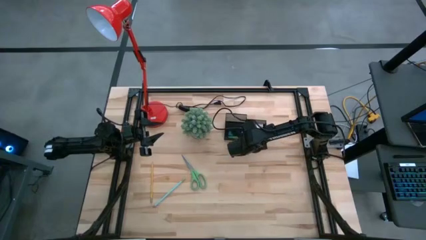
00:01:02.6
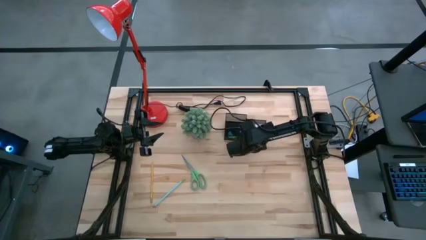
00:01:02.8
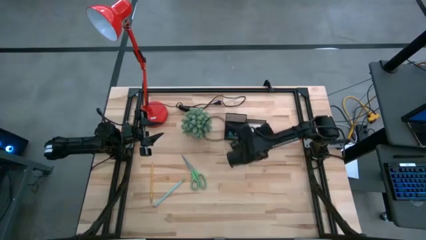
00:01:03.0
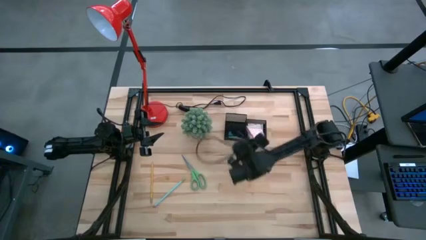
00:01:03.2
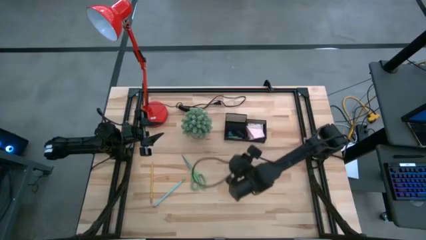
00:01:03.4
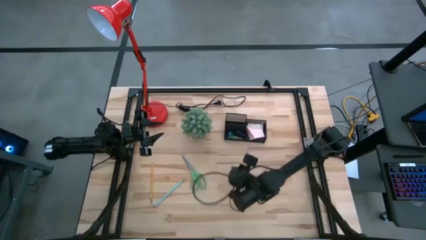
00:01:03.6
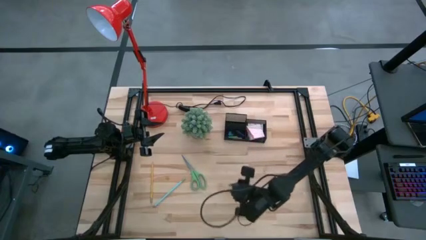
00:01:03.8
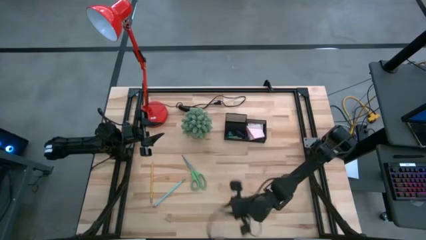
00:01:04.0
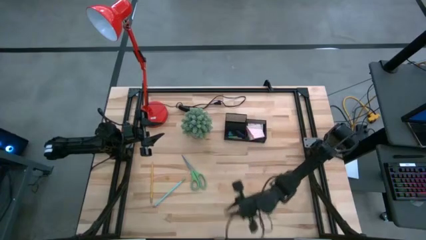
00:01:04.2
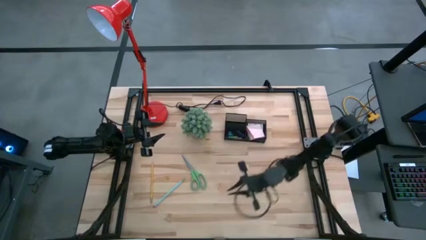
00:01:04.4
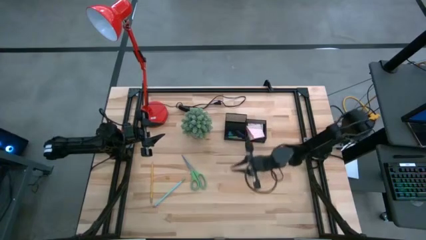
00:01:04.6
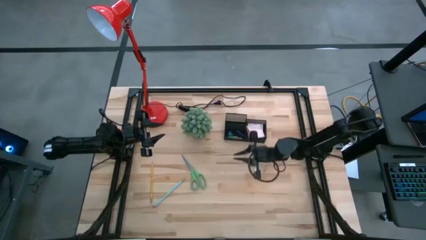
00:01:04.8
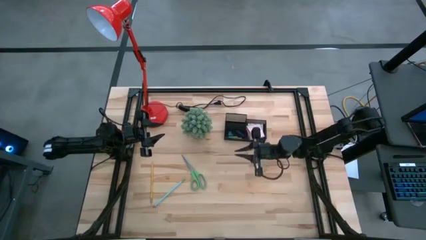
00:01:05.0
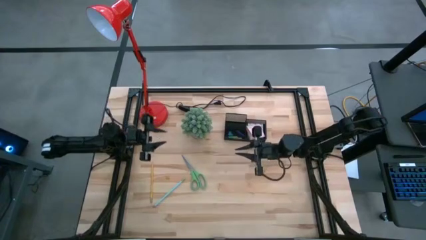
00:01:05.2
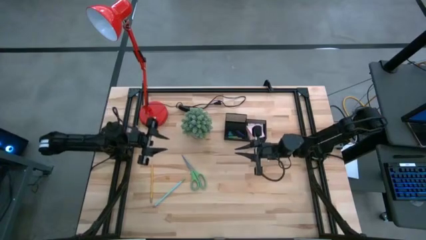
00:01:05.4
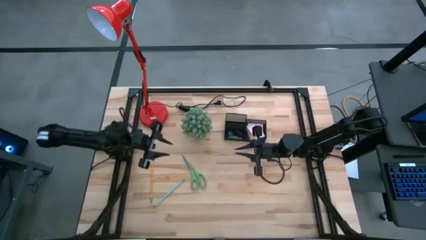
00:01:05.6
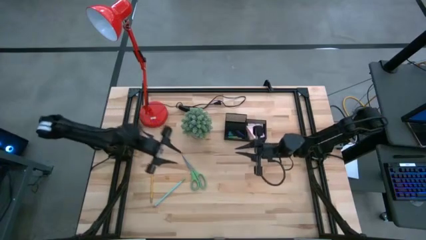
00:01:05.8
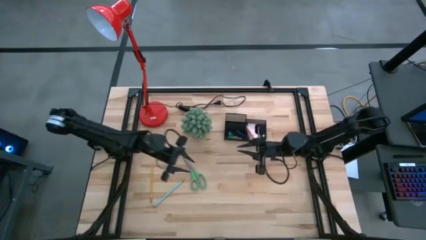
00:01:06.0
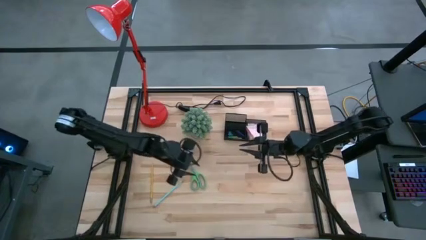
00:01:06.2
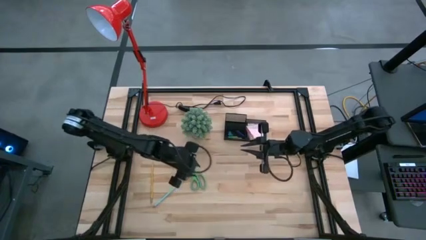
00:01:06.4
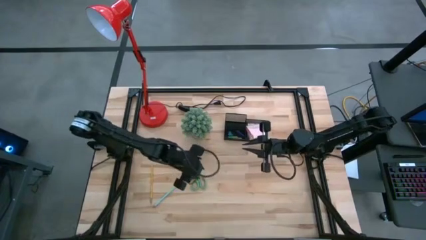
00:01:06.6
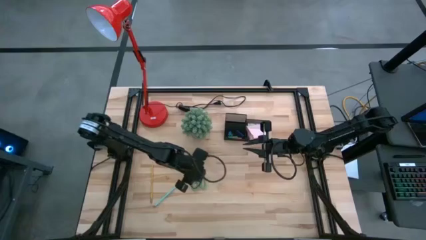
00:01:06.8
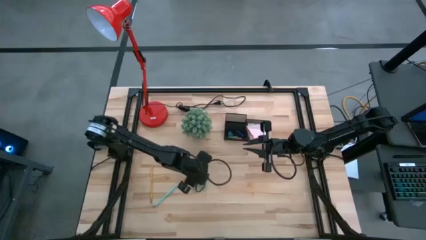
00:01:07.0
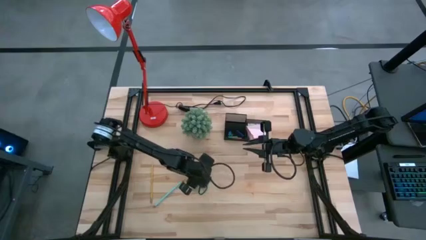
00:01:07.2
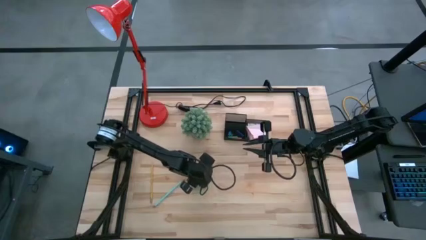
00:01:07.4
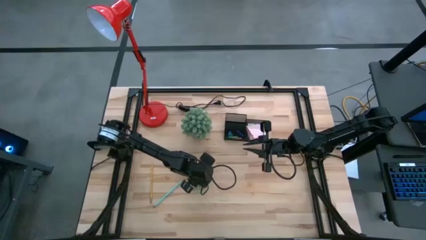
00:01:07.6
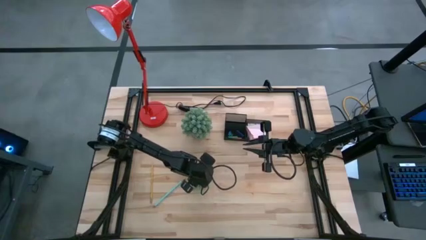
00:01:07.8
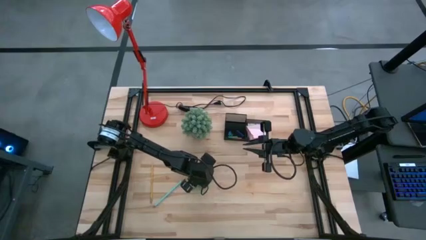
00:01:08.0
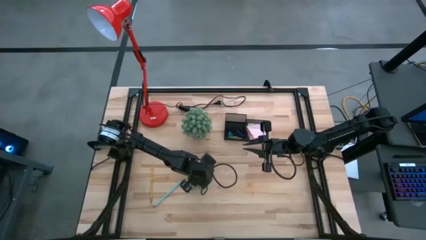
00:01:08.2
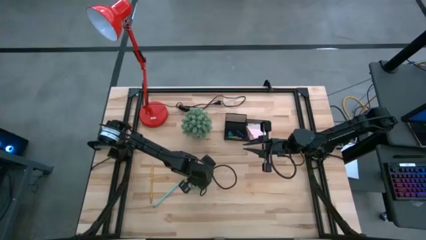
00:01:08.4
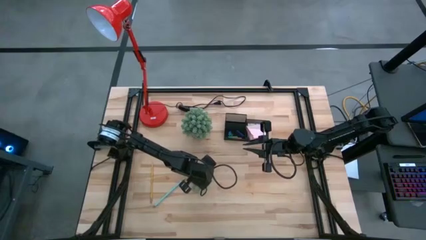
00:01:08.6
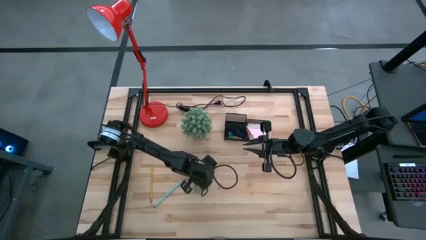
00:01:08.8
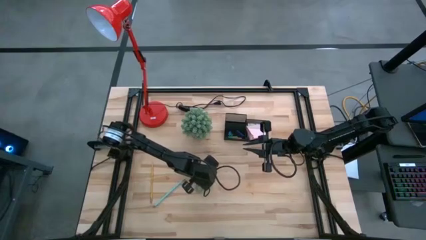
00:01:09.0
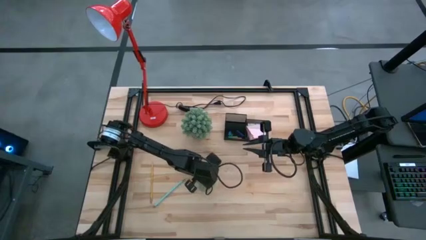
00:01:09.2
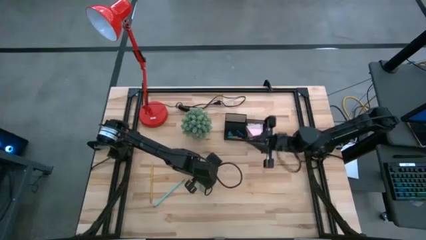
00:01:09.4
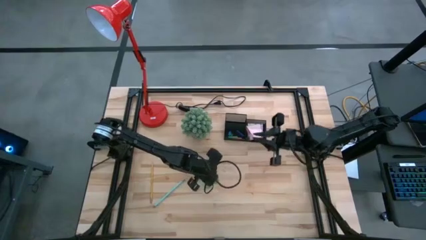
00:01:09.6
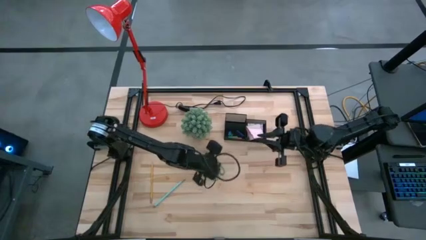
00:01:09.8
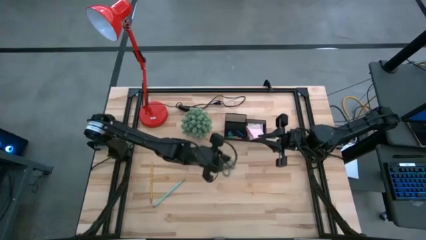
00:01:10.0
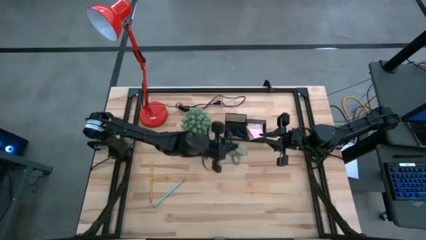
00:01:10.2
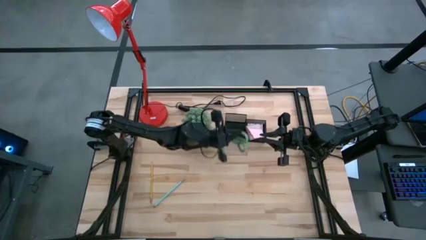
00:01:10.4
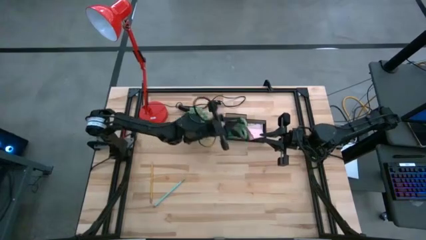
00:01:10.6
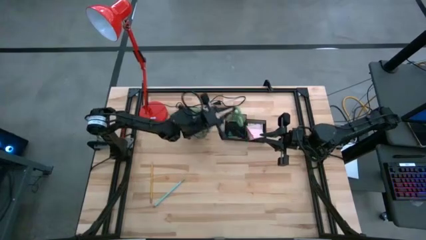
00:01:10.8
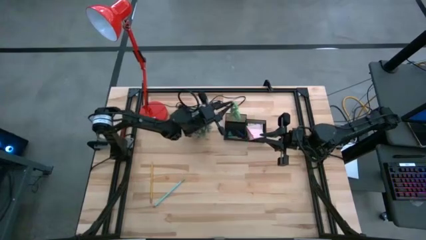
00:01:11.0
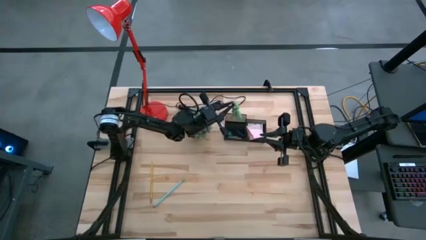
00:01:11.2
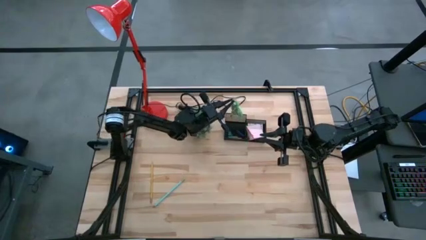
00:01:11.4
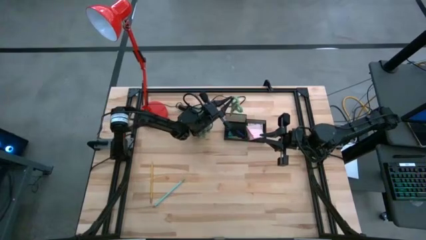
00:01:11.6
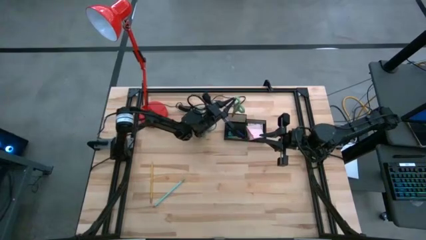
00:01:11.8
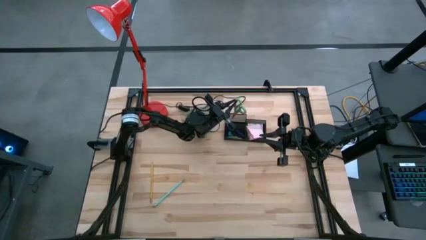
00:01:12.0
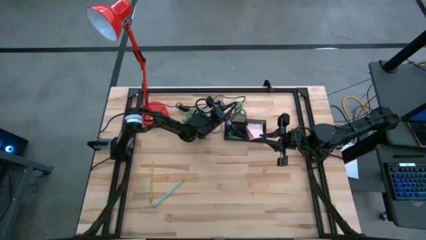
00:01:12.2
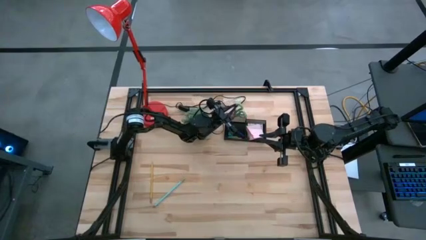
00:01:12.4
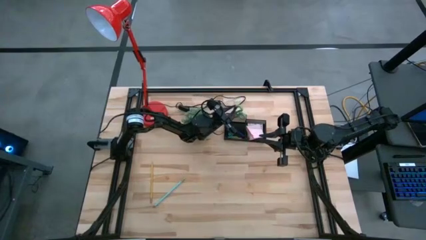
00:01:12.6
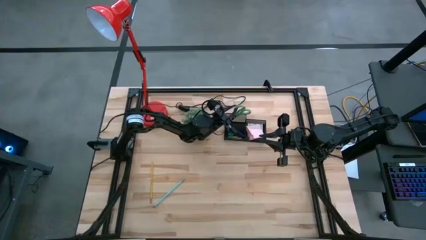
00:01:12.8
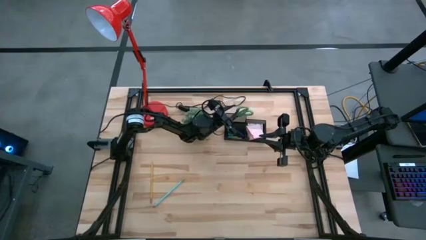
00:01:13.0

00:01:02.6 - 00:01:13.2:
Task: Pick and place office supplies into organizer
Put the green scissor into the black desk organizer

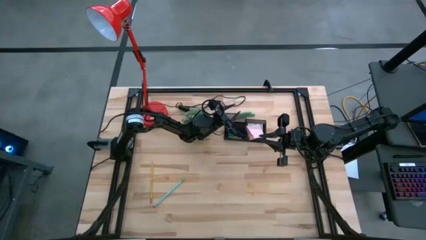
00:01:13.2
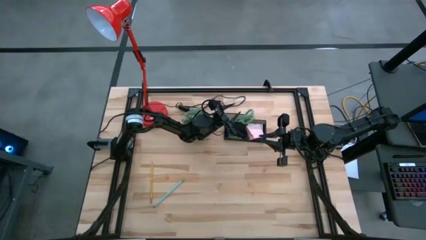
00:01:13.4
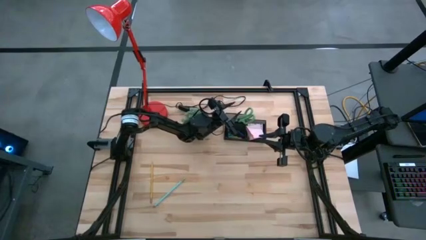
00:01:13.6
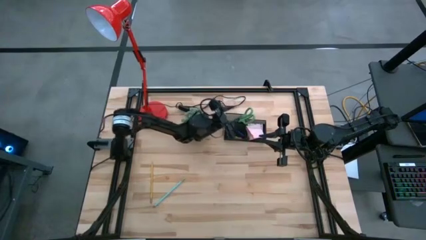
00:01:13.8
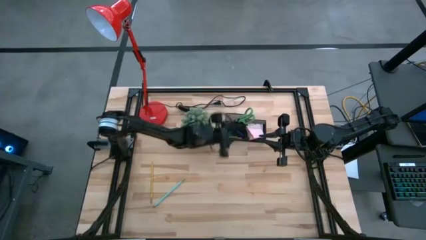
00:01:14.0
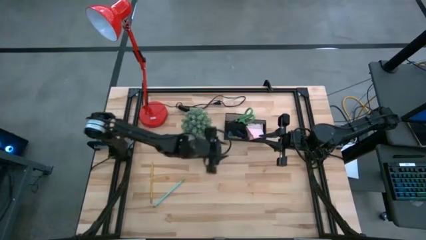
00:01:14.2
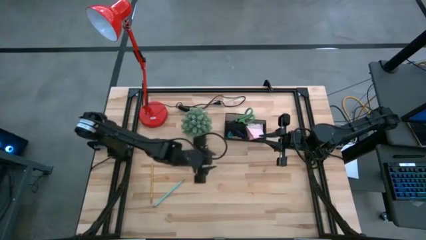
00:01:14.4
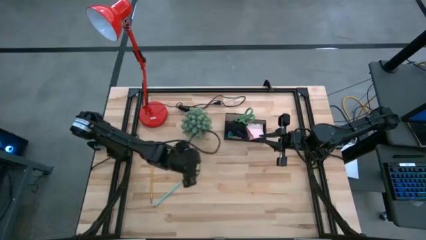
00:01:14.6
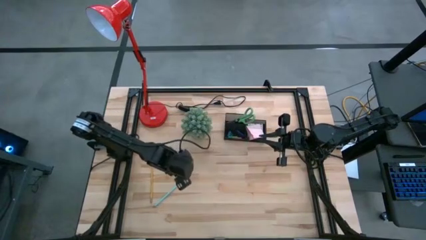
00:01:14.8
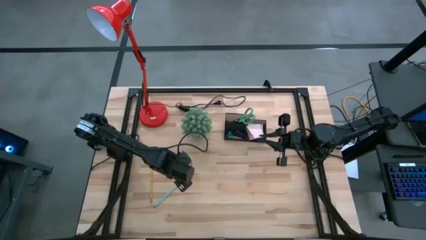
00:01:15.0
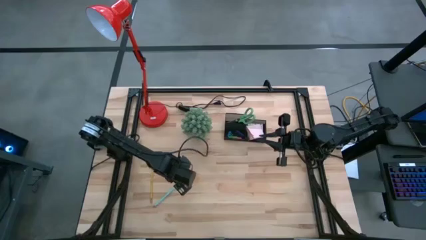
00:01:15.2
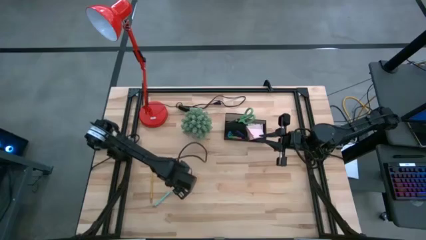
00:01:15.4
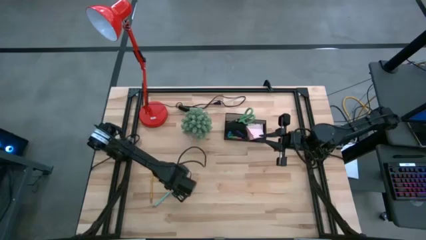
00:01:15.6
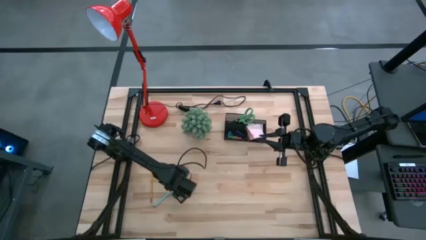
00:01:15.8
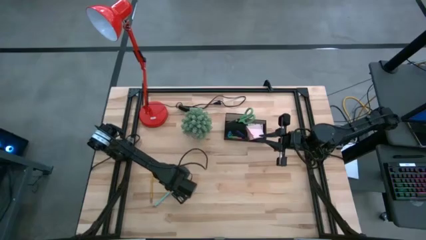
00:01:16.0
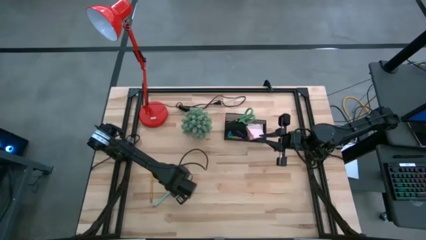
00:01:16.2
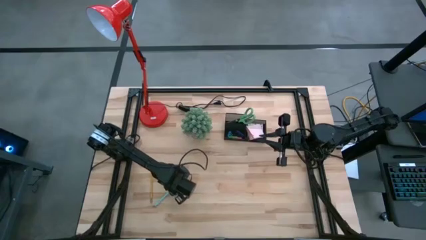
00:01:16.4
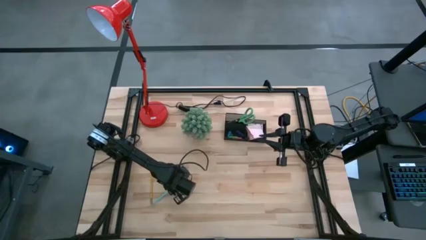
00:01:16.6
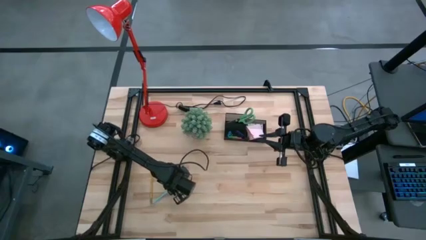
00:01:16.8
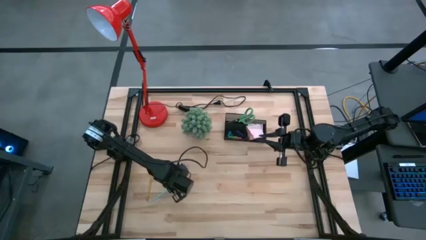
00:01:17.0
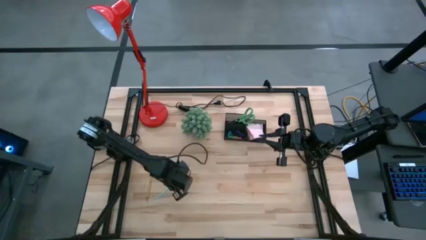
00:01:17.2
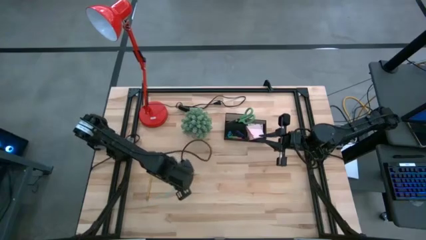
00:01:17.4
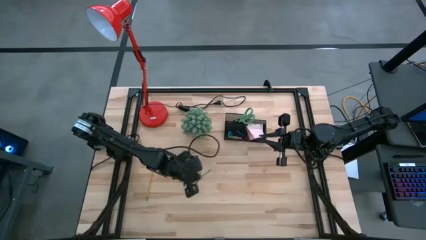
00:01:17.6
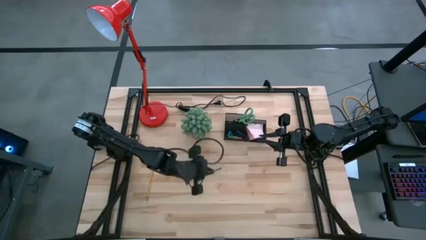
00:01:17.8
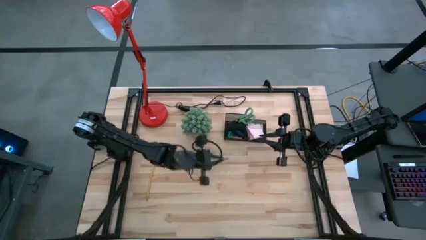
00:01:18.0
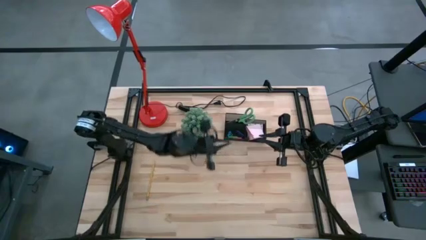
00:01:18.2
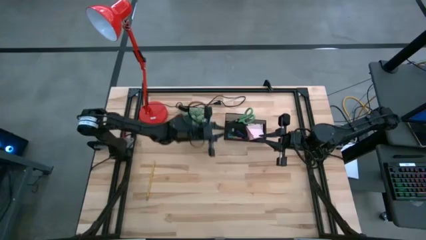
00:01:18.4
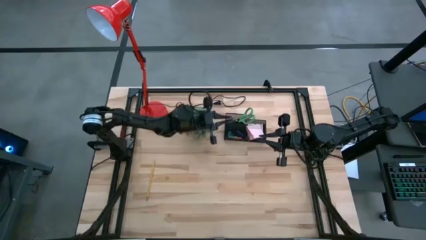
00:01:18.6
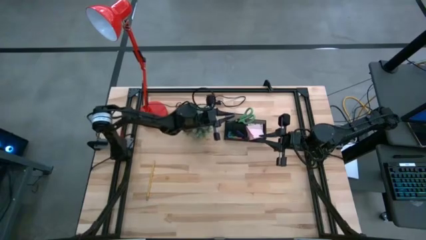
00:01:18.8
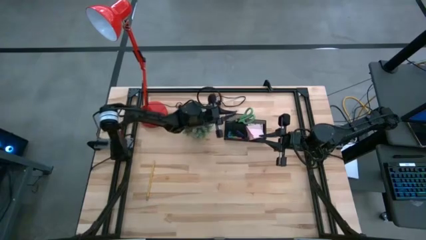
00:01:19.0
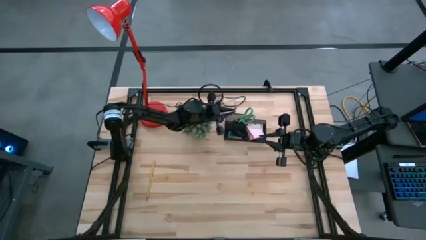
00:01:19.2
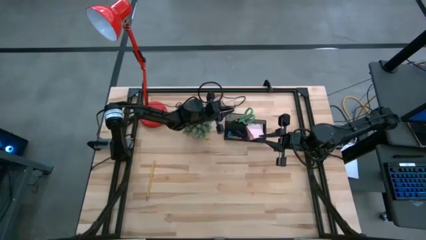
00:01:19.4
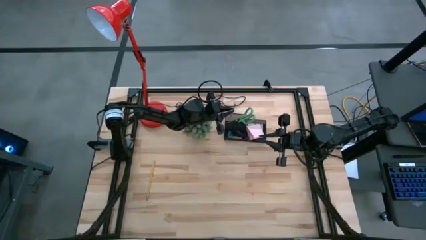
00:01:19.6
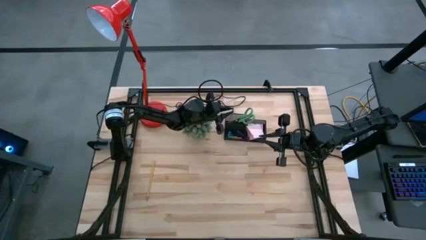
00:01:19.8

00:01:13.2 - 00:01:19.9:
Put the blue pencil into the black desk organizer
